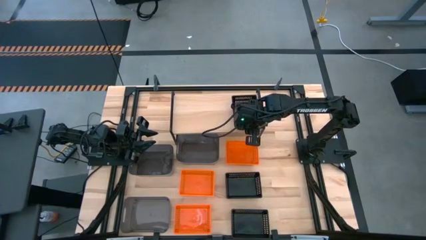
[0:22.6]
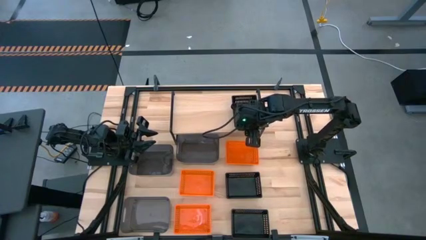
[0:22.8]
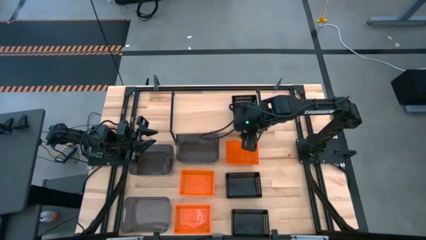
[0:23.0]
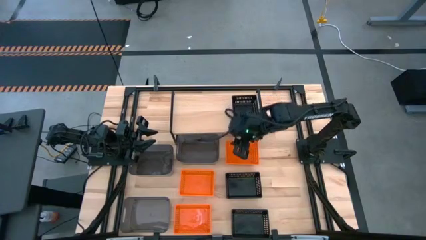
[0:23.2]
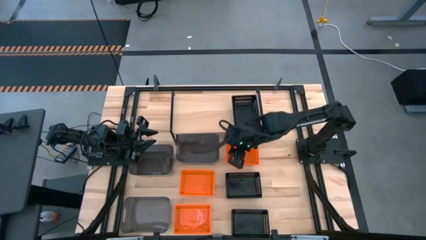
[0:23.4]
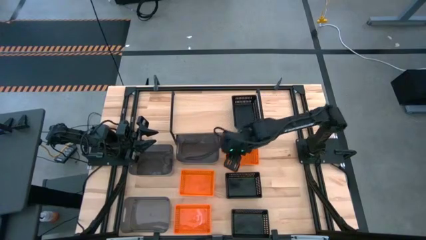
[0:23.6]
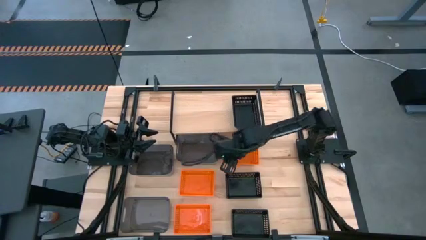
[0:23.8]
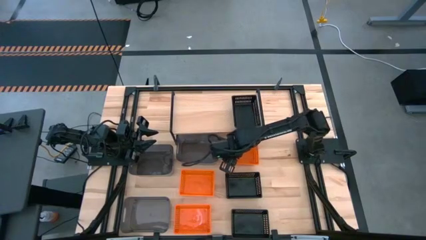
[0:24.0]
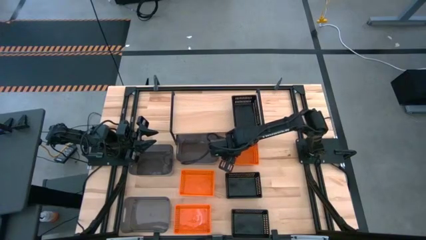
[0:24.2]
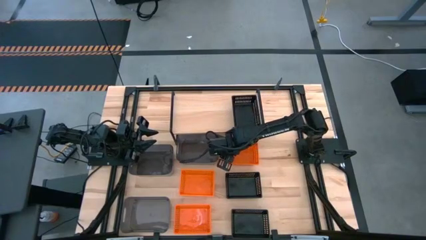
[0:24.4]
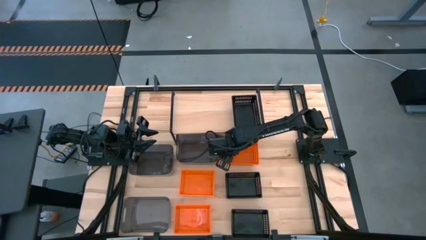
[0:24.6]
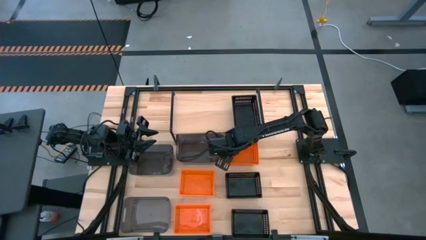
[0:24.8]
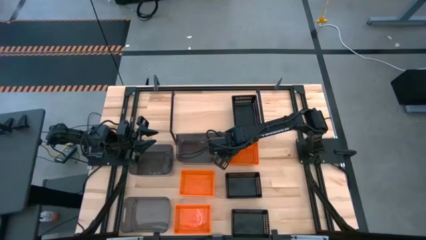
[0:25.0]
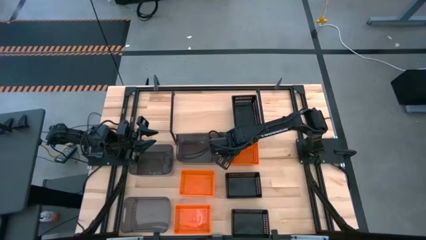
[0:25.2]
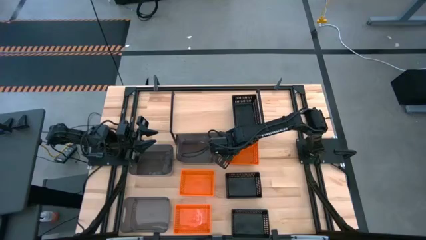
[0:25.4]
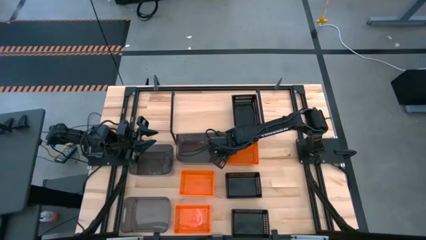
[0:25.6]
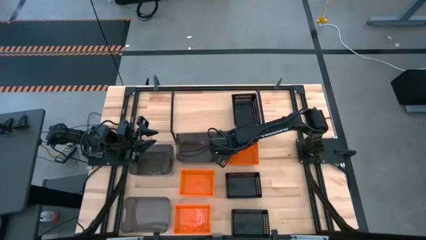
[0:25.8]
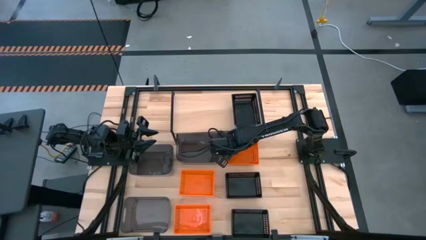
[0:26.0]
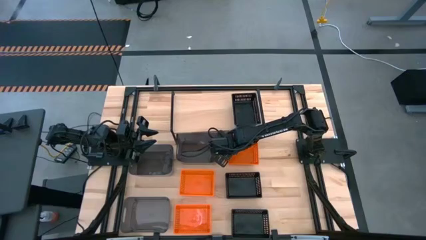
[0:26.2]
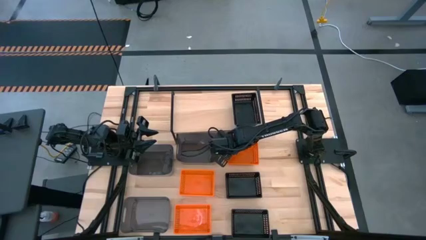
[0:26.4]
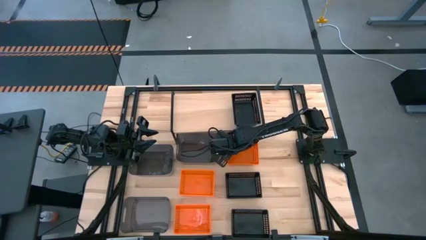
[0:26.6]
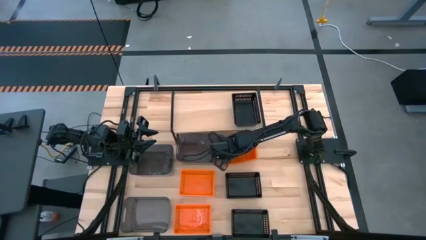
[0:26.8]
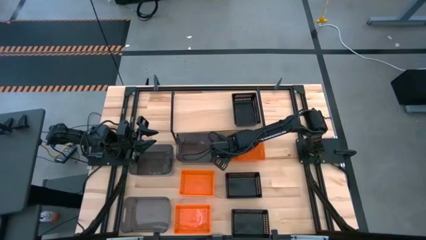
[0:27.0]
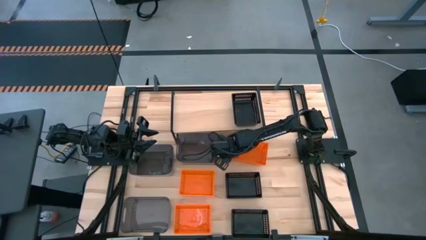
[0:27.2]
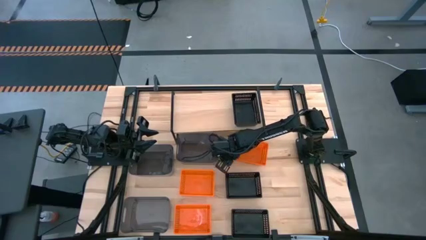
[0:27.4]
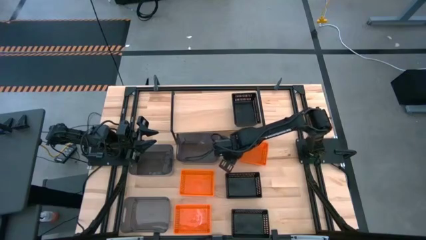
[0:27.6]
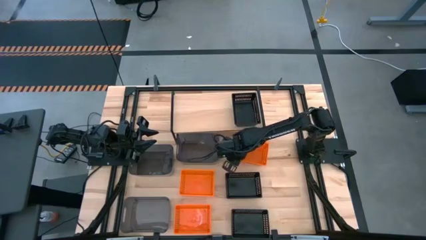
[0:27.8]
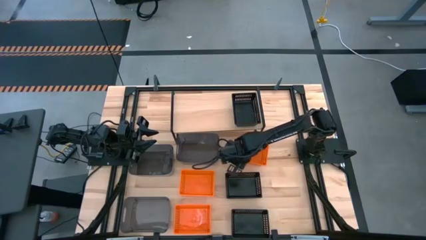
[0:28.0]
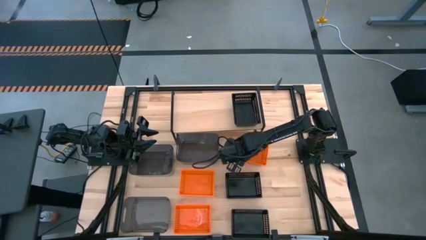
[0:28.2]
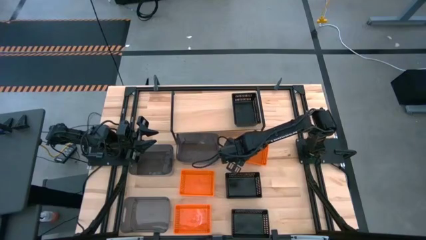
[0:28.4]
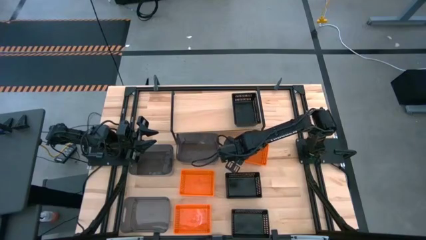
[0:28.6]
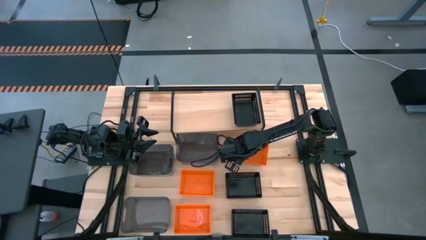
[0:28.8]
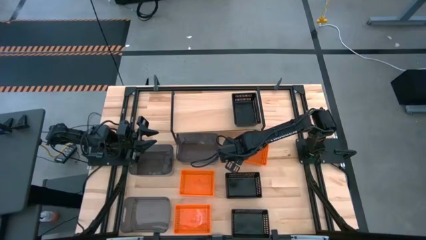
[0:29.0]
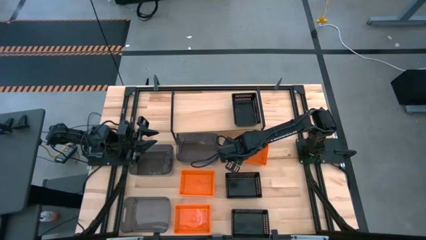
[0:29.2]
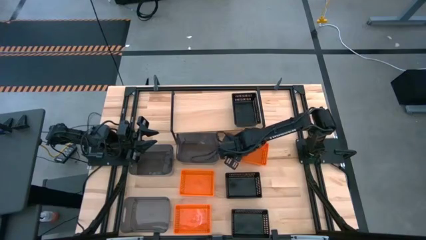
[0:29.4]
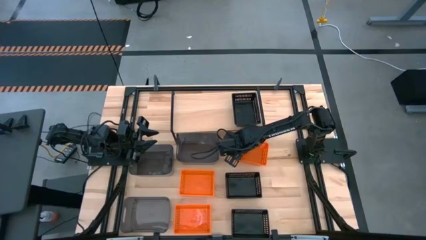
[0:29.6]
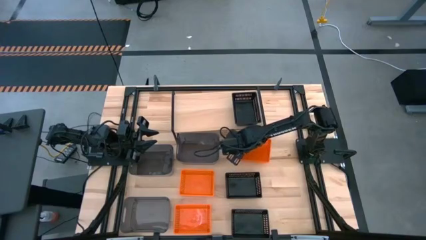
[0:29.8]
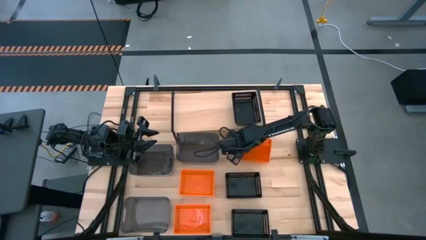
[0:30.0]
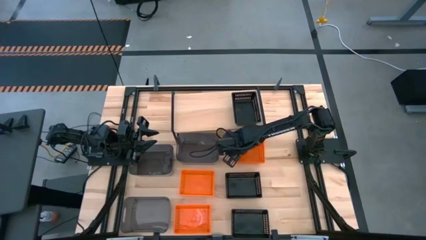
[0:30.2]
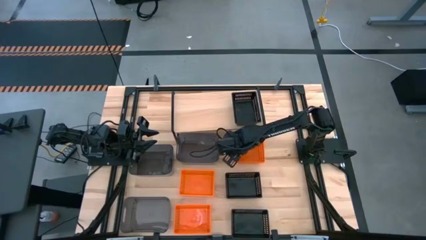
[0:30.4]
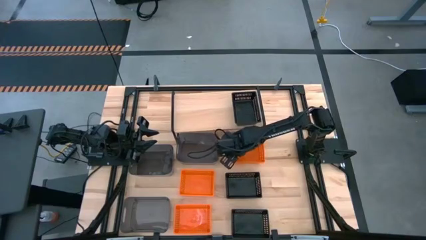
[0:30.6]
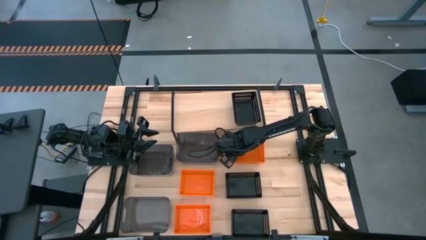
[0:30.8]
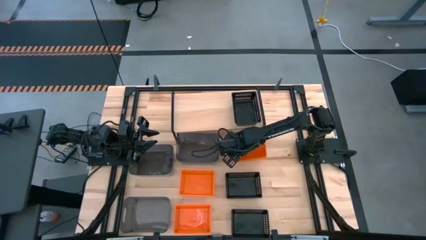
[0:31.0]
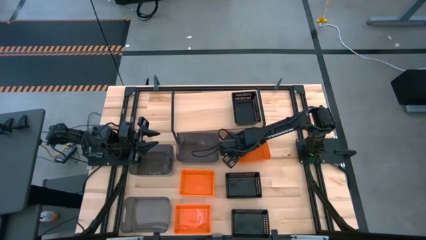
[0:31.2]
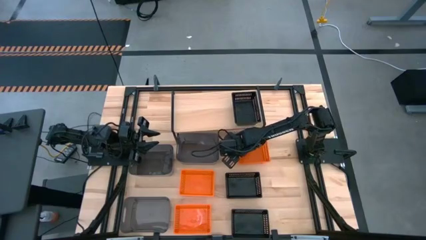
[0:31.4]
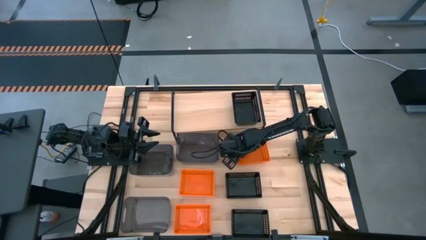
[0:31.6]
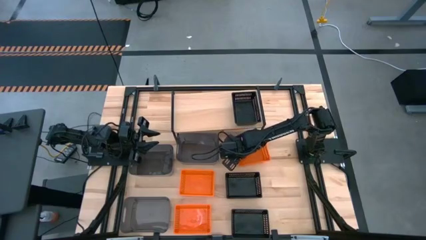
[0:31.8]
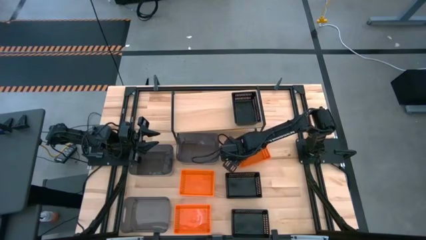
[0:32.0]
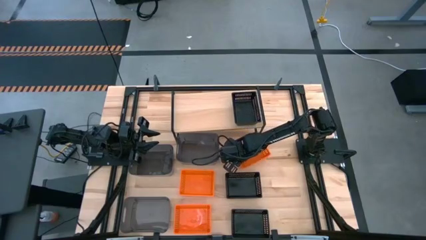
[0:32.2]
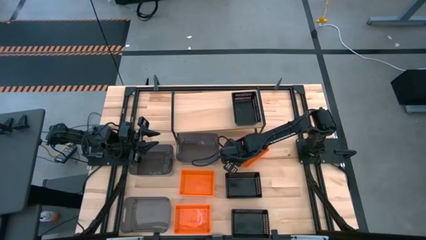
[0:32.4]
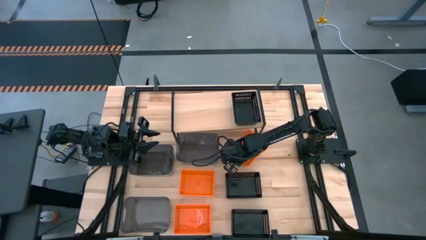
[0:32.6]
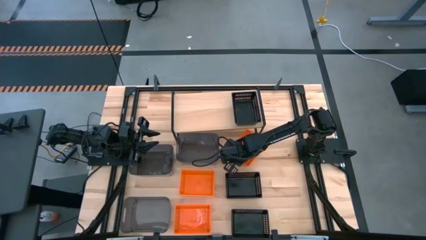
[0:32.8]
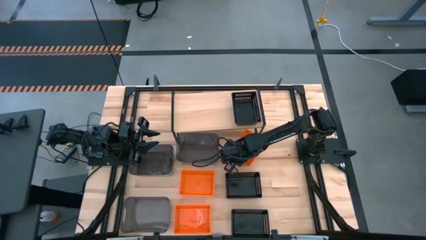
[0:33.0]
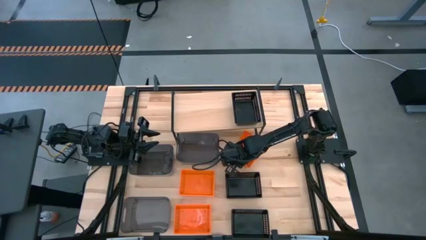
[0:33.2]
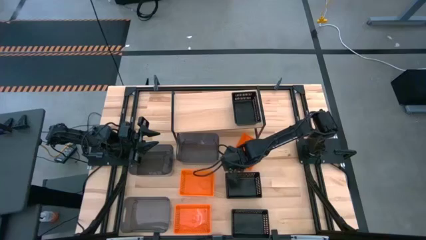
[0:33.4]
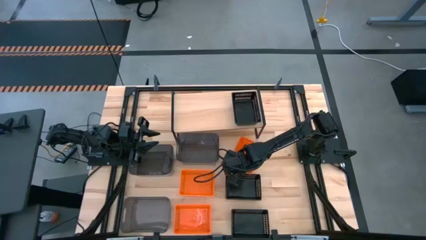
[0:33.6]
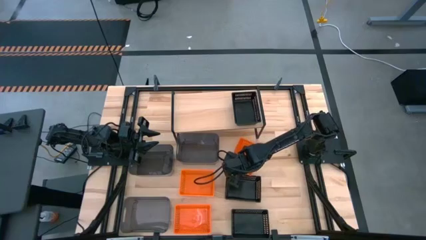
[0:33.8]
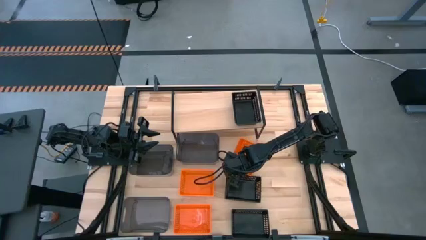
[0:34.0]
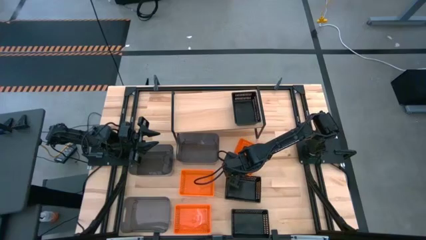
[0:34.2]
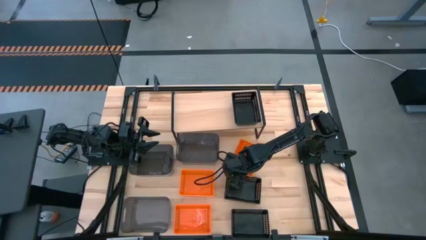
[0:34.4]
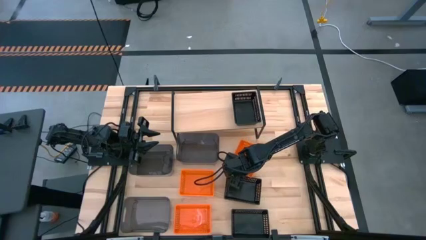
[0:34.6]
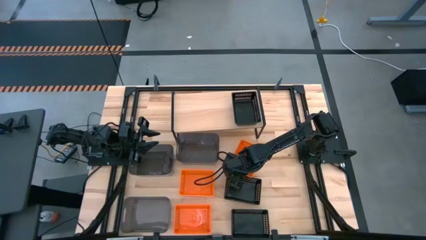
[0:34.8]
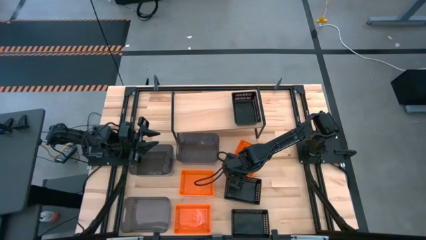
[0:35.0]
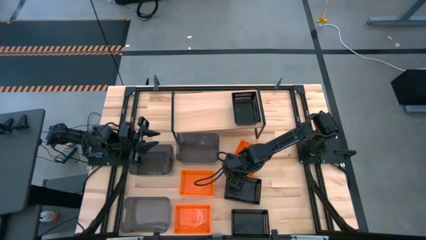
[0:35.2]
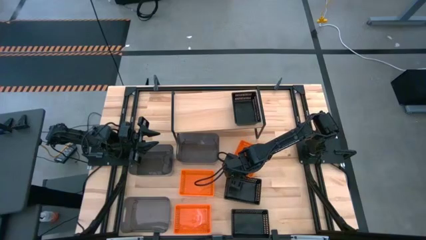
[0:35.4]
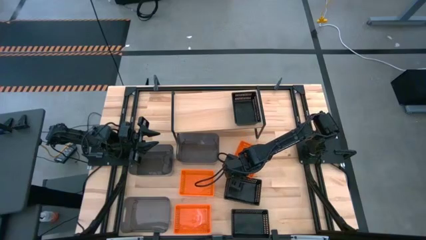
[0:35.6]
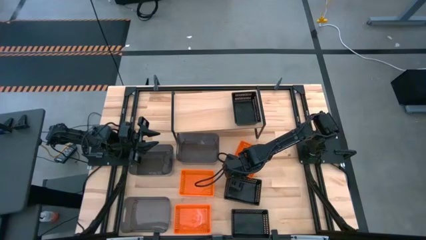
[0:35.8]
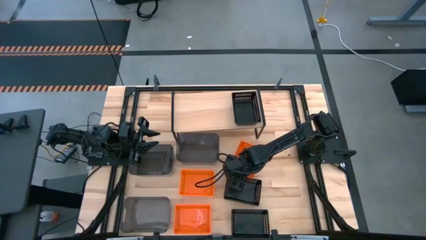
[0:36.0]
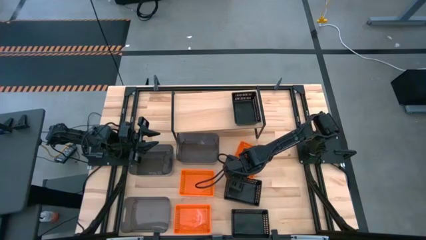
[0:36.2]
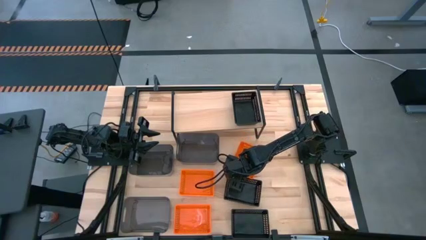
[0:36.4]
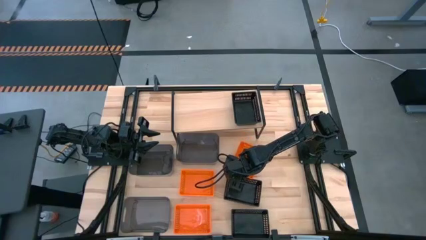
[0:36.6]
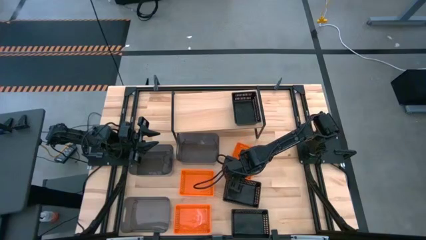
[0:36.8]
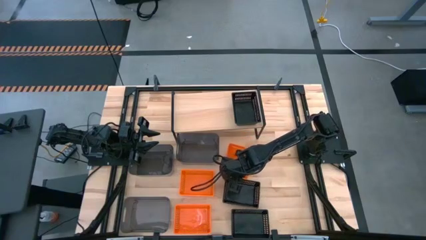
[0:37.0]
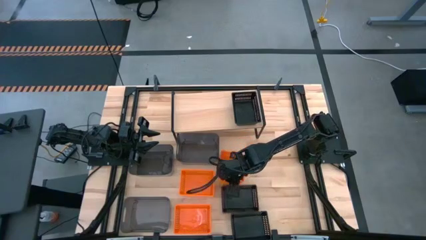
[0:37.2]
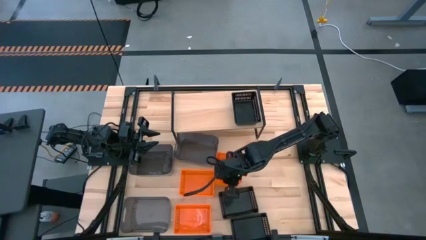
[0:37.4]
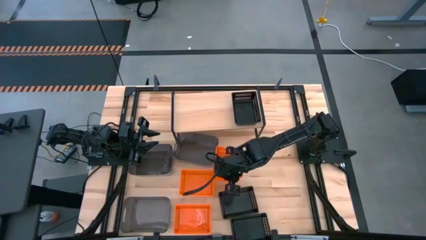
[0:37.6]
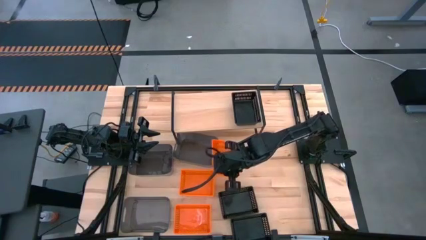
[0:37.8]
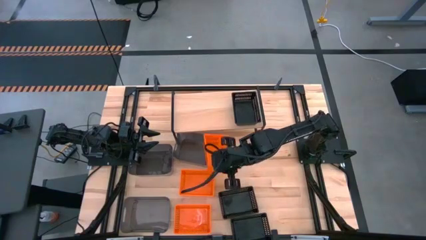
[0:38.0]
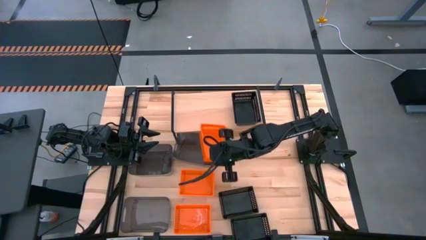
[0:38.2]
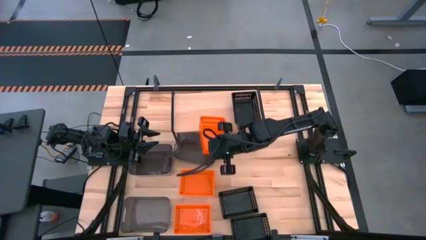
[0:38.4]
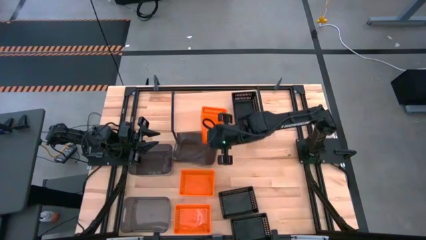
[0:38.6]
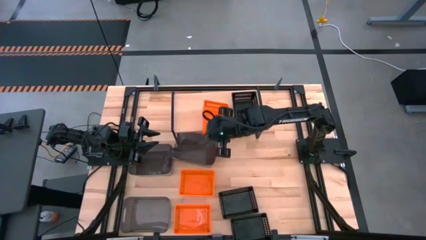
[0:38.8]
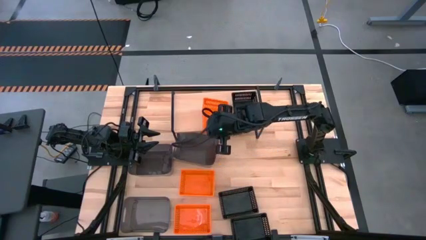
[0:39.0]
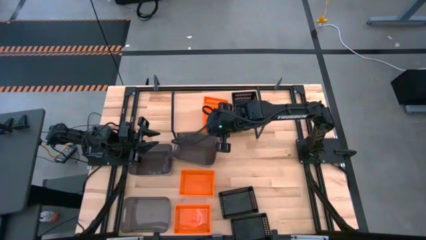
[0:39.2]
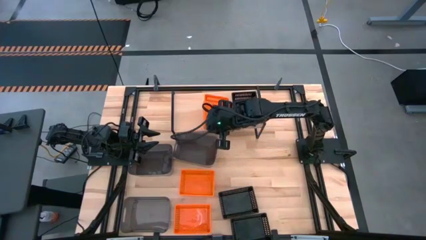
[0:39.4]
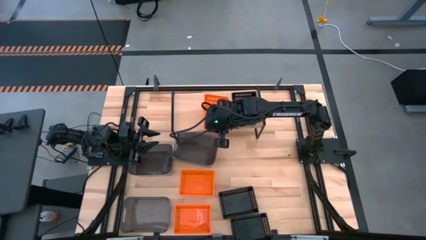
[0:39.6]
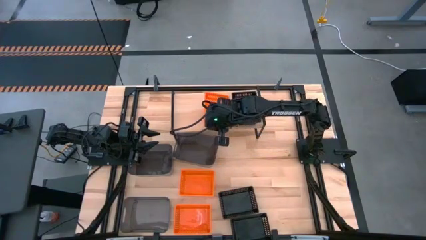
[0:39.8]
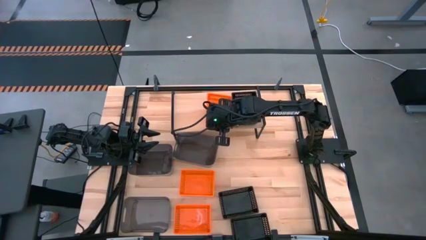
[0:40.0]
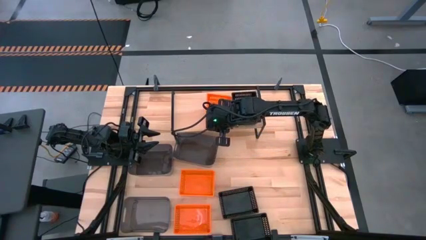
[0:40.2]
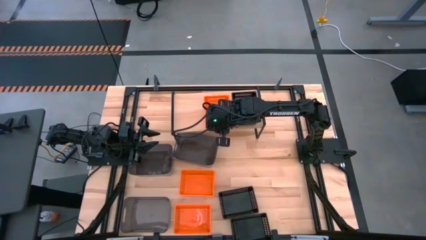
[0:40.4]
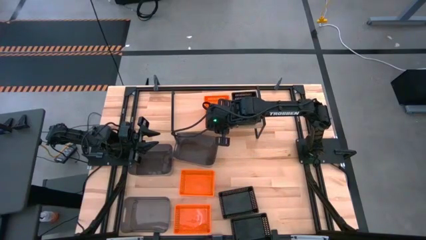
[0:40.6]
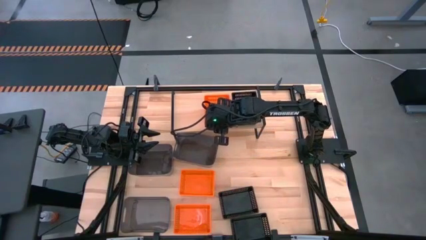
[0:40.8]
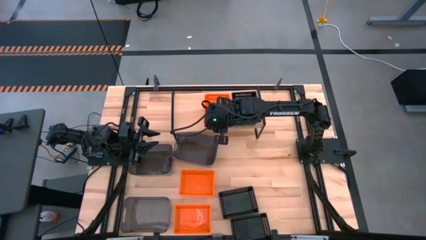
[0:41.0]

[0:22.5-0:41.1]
Task: Stack baskets on shelf by color
Put the top orange bin on the shelf
